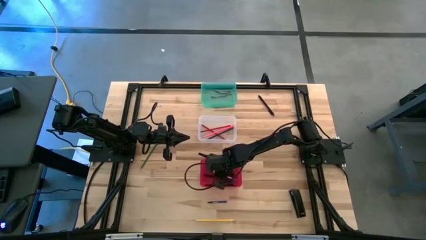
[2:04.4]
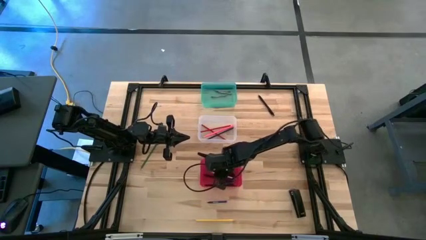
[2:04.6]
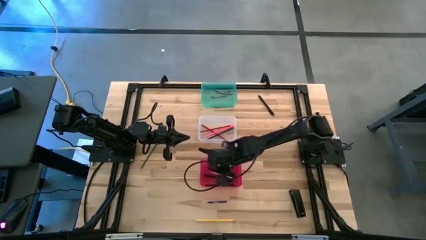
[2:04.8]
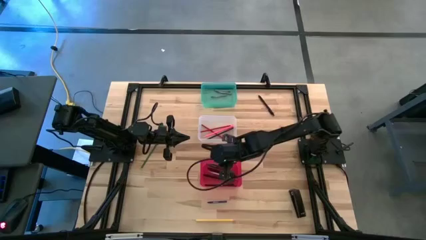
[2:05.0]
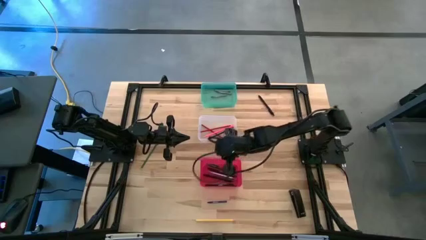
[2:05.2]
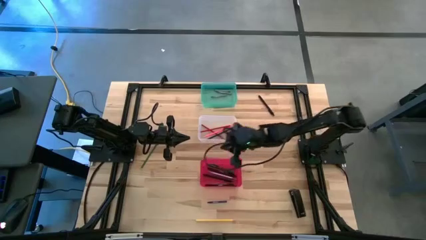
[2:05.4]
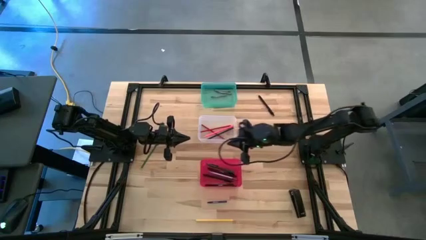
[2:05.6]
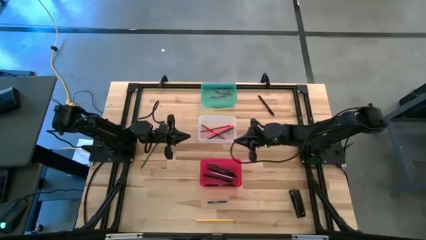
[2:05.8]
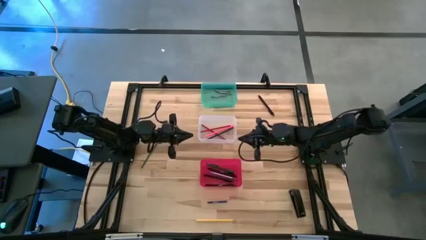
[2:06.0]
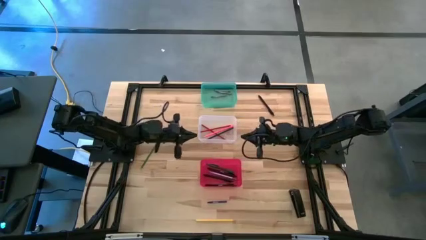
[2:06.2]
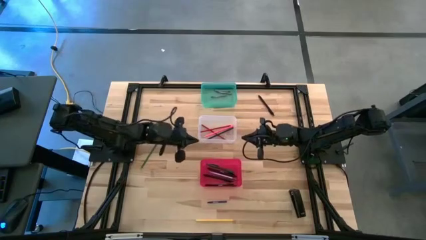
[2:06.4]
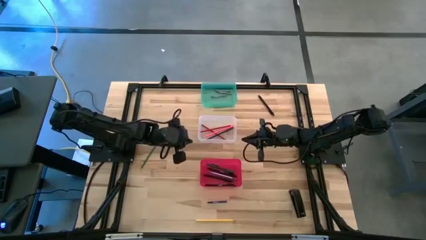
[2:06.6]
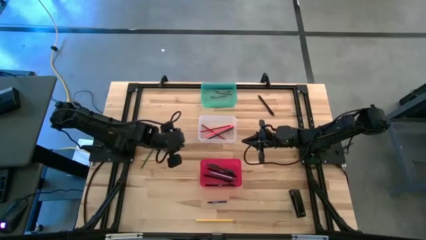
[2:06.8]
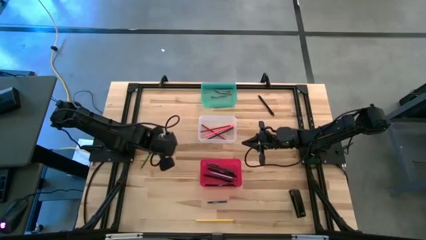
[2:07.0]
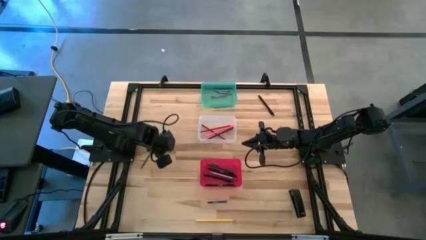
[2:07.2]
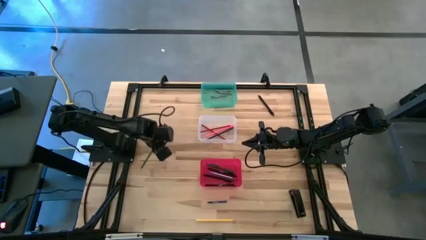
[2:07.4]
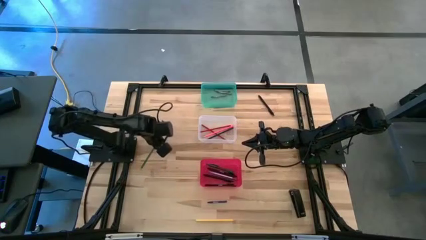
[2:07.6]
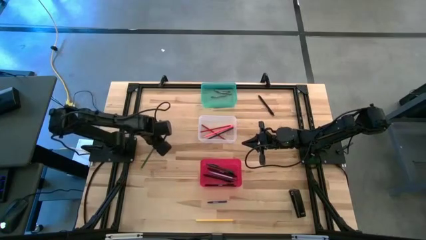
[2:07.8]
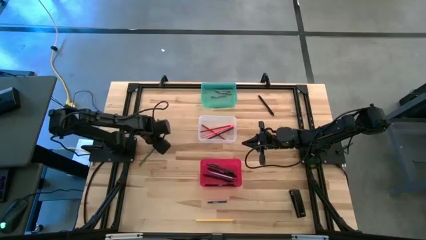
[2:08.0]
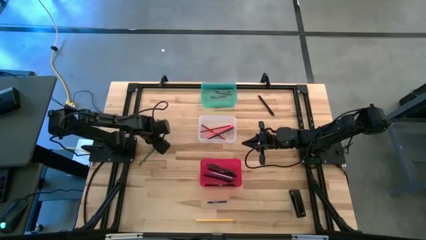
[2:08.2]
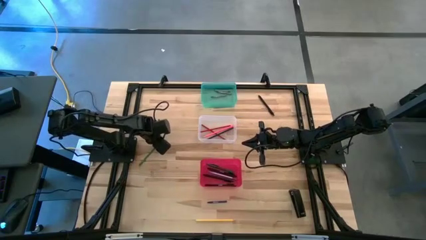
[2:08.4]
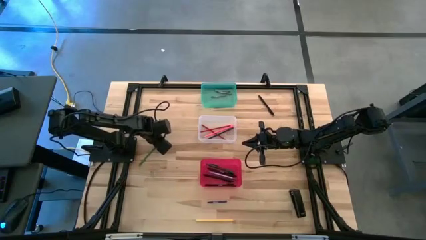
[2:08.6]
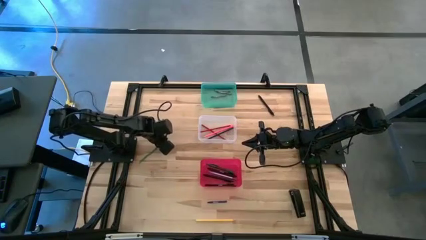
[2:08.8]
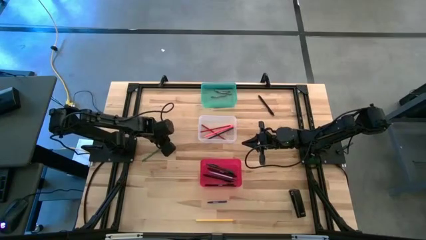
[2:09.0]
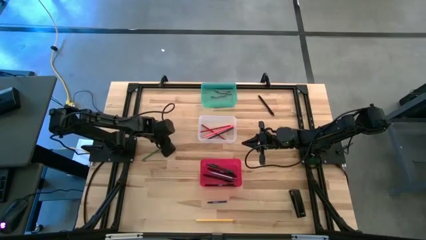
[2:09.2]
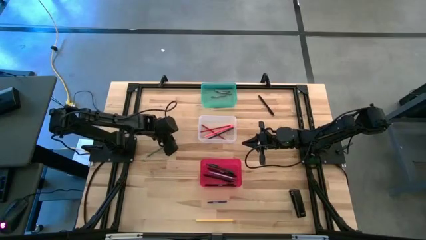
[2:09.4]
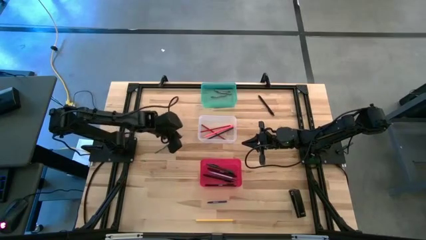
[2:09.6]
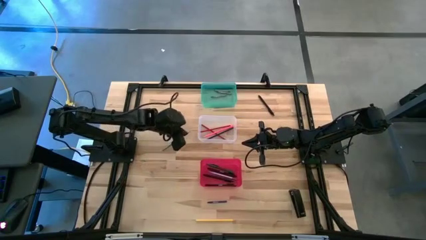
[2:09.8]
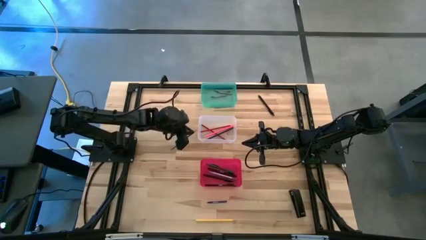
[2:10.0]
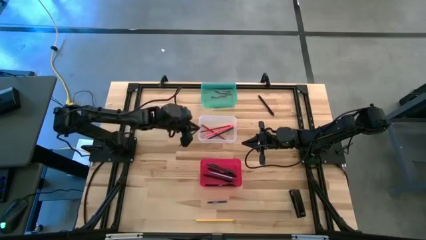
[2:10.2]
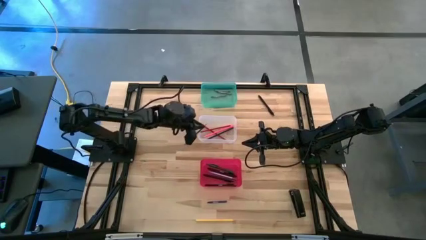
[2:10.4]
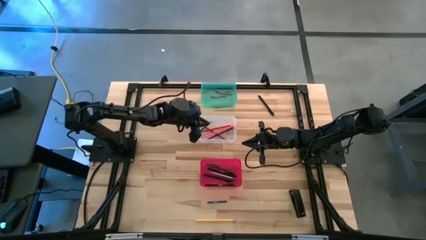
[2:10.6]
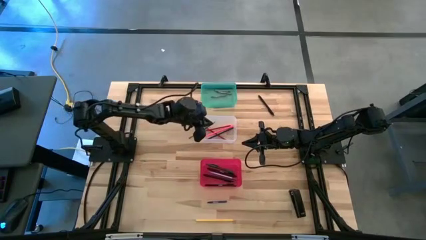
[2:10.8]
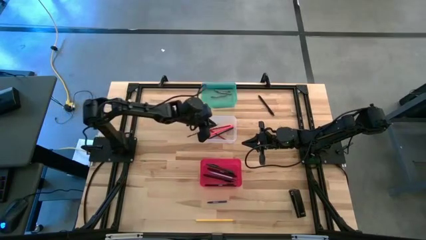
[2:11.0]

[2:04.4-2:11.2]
Task: Sort crayons/erasers/pens/pencils in bins
Put the green pencil into the transparent bin

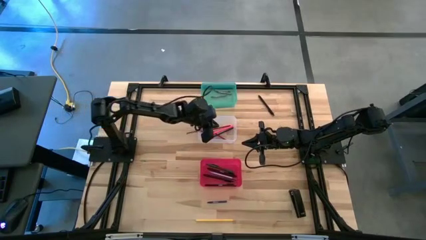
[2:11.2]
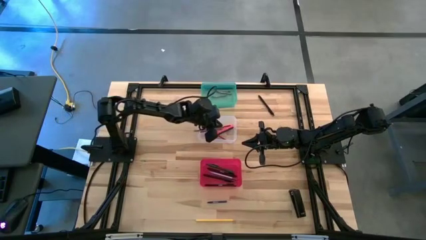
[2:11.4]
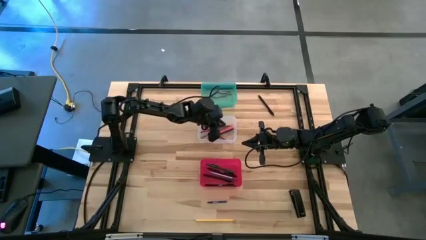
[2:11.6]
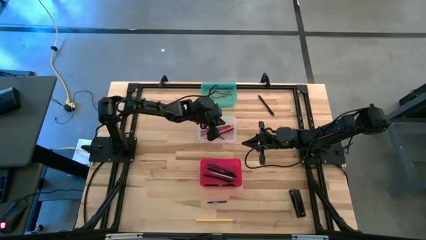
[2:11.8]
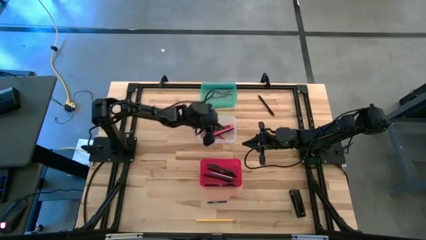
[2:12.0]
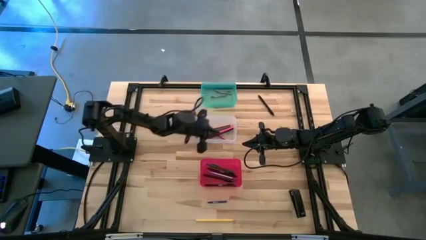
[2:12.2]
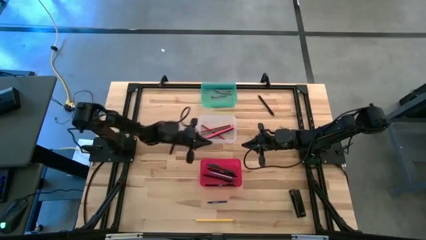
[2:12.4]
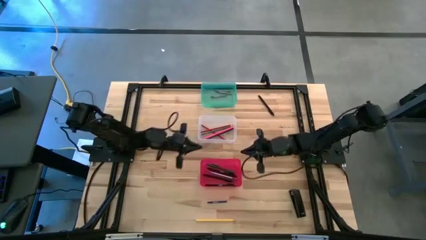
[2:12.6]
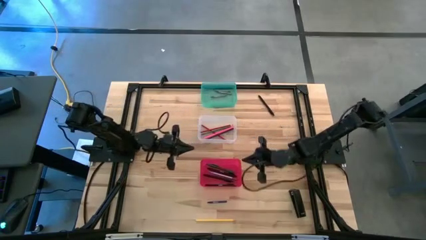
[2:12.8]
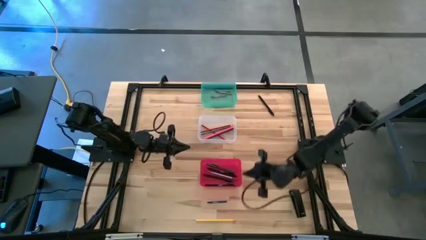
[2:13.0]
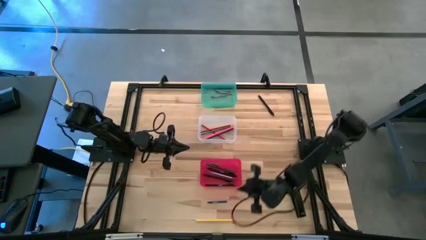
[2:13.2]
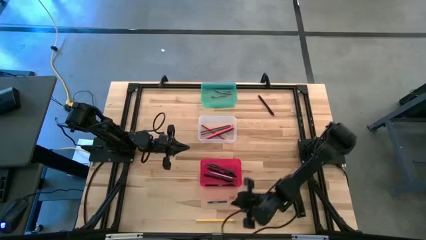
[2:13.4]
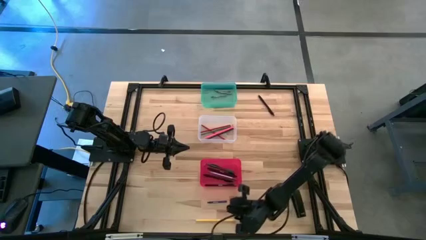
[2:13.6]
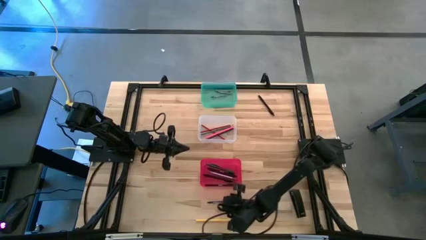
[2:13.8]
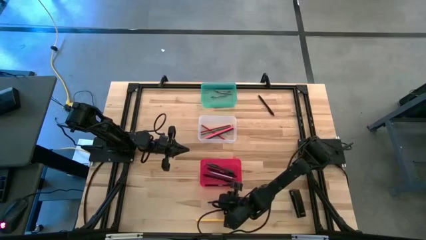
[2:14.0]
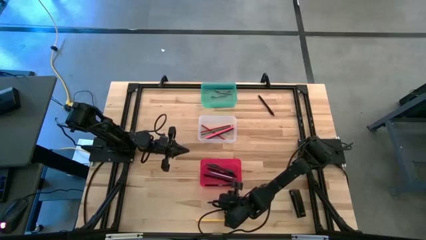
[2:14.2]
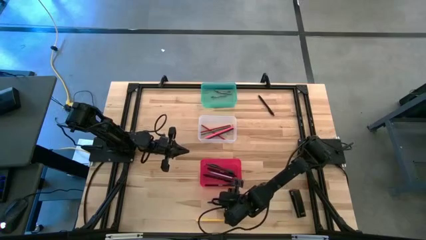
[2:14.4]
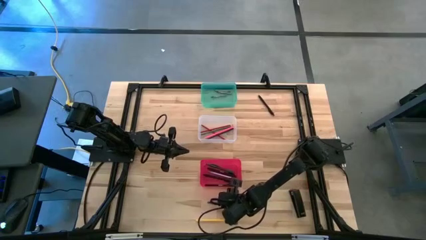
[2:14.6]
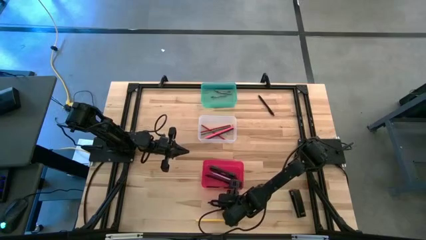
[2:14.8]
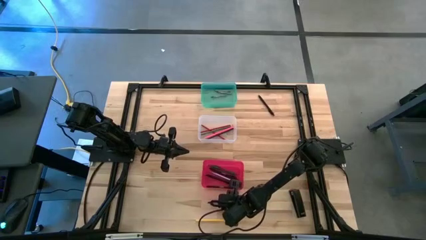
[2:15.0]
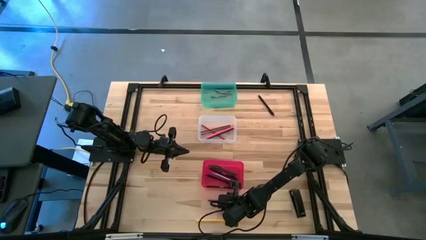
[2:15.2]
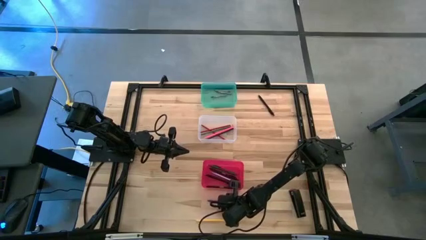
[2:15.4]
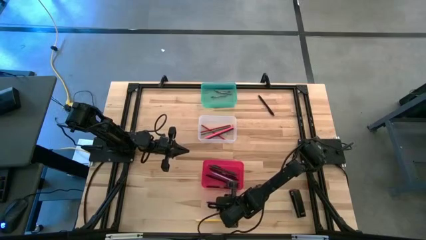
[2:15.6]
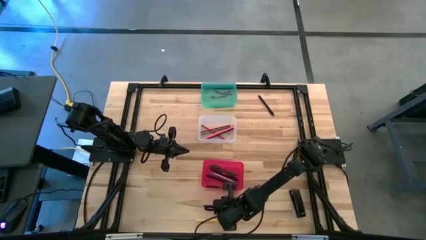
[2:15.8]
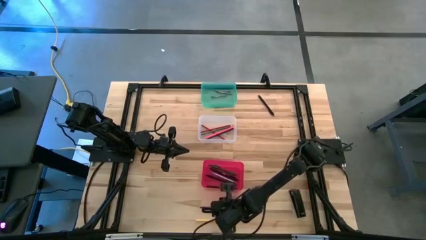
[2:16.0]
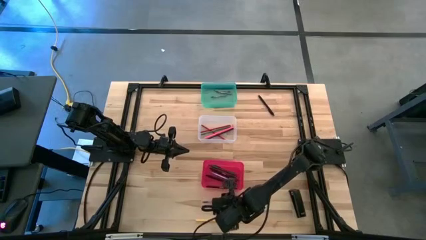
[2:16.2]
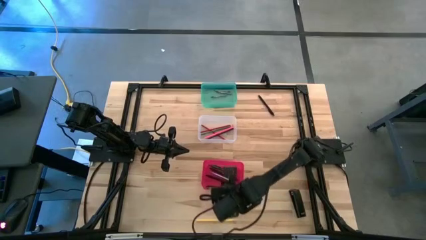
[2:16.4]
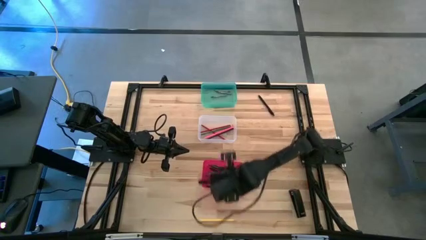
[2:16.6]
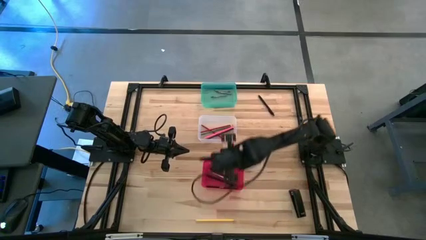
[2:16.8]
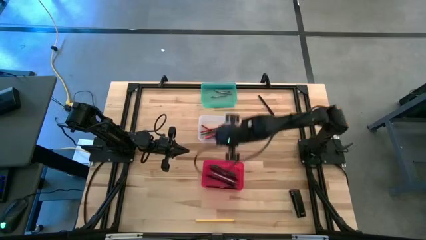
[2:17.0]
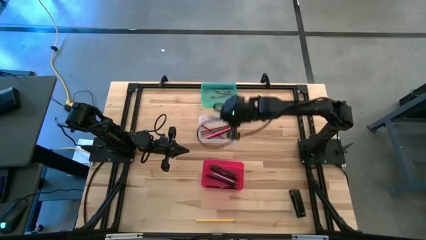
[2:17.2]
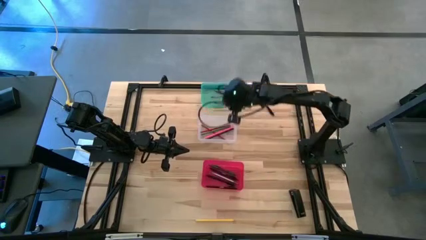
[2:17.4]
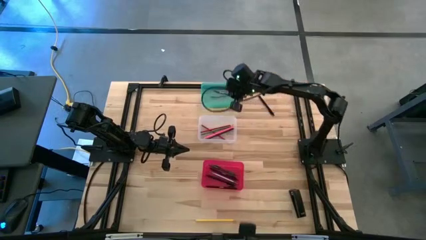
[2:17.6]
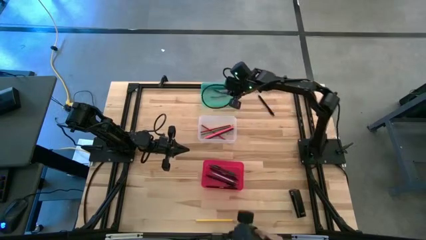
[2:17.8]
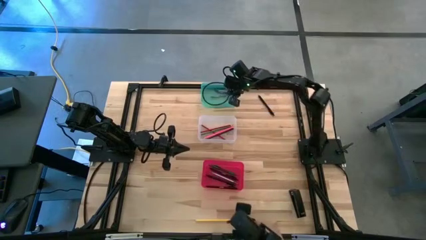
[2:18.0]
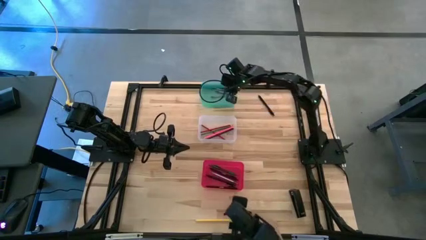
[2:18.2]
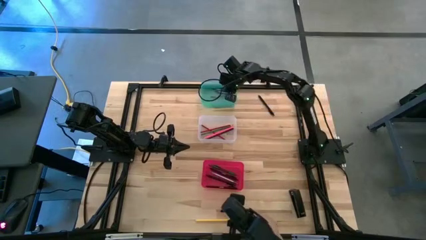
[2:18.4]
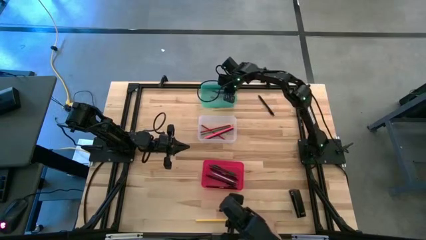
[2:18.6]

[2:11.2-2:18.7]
Put the blue crayon into the green bin

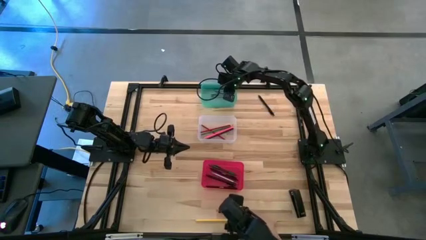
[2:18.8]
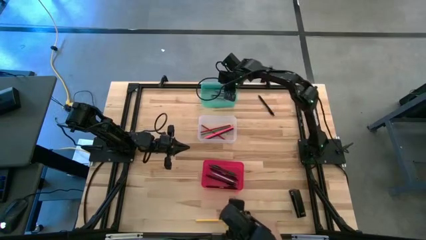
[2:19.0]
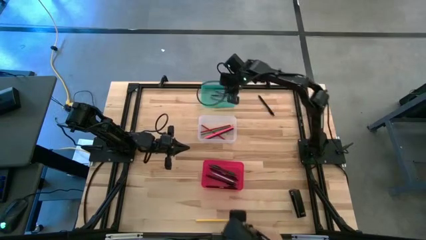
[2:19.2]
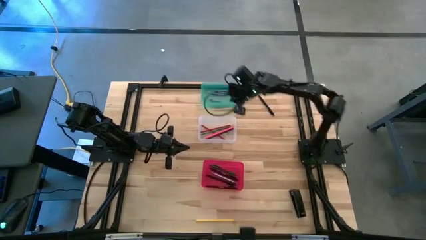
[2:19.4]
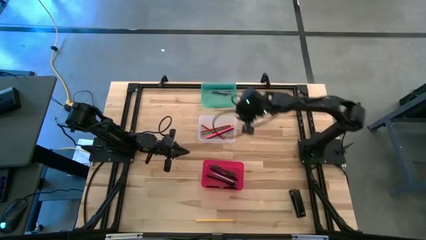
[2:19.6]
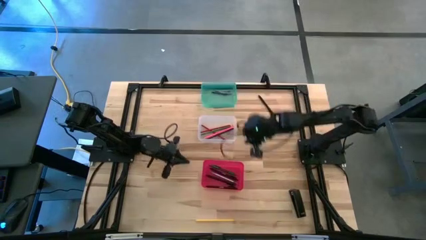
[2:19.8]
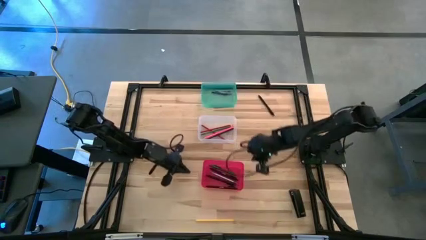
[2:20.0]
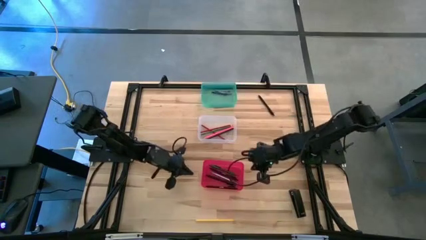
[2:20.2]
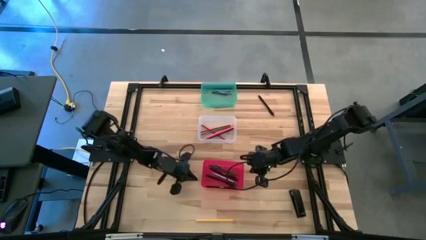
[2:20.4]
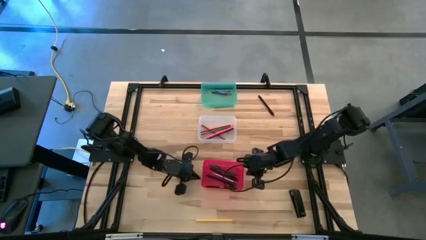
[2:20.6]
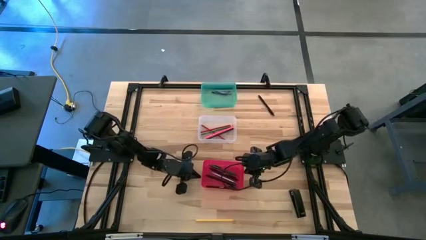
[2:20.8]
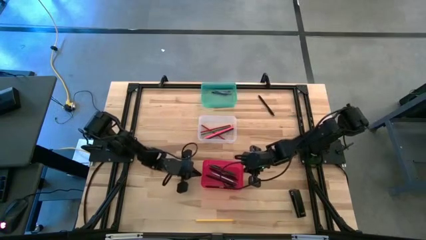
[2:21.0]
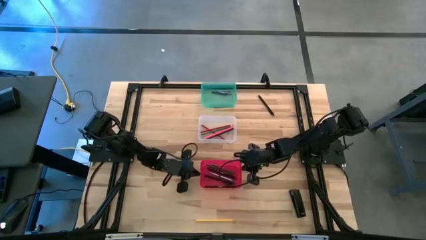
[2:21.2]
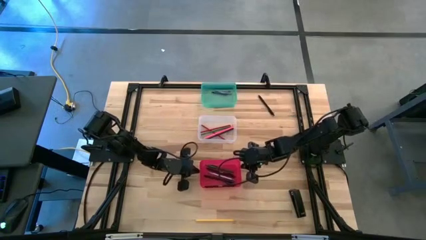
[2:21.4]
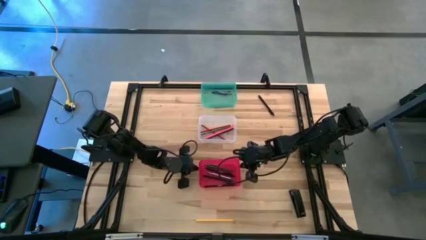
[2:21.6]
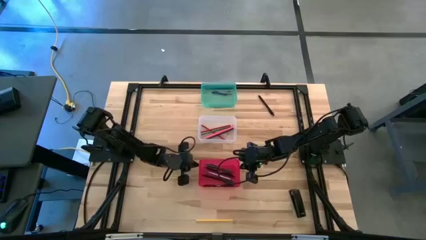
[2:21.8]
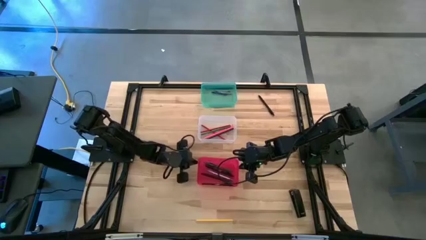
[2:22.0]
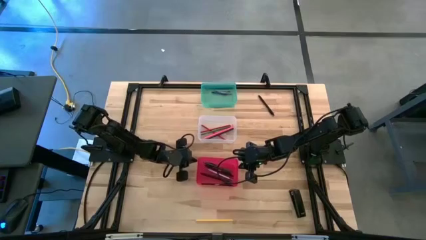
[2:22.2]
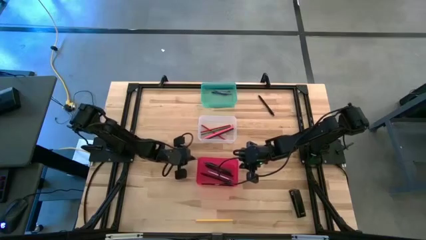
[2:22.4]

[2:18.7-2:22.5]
Adjust the red bin
